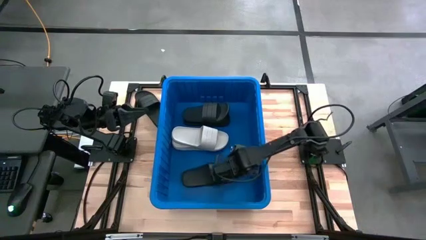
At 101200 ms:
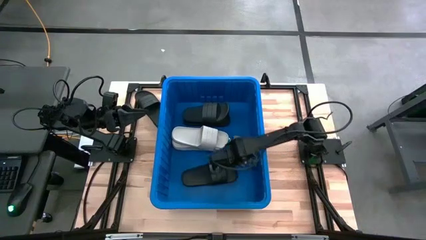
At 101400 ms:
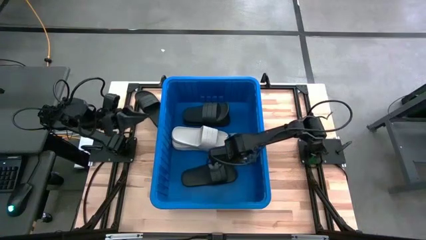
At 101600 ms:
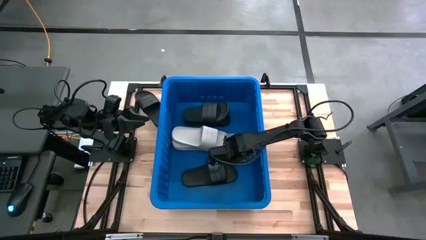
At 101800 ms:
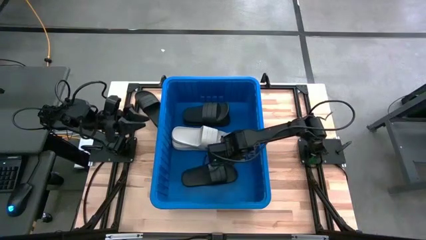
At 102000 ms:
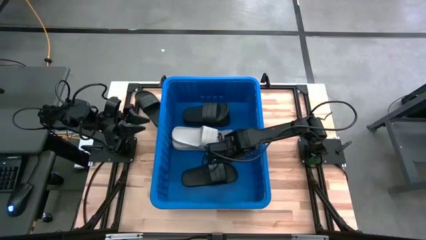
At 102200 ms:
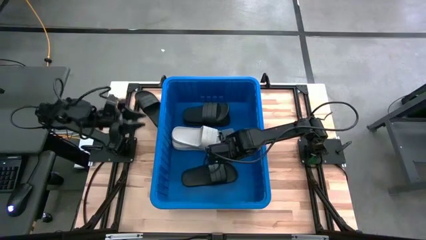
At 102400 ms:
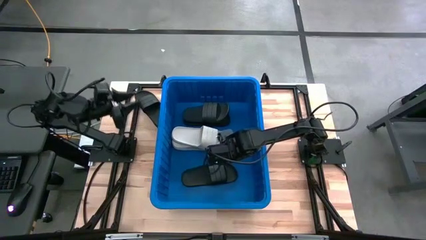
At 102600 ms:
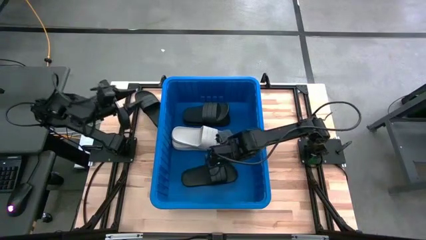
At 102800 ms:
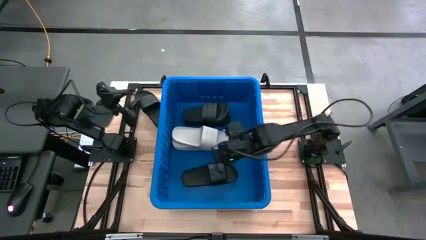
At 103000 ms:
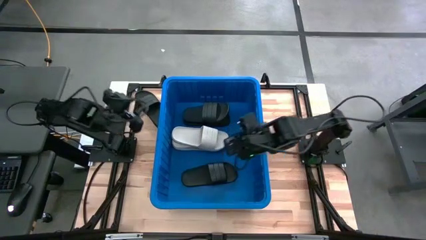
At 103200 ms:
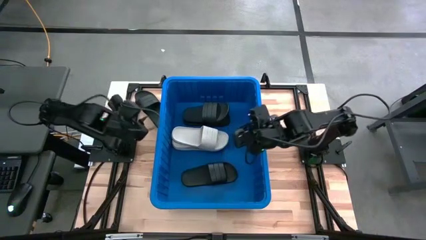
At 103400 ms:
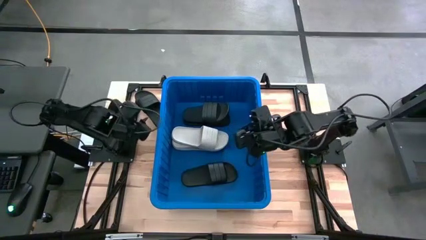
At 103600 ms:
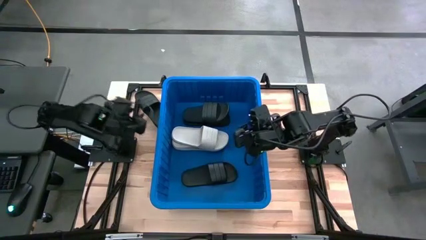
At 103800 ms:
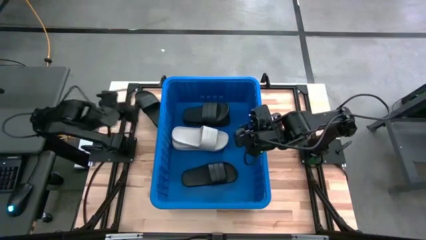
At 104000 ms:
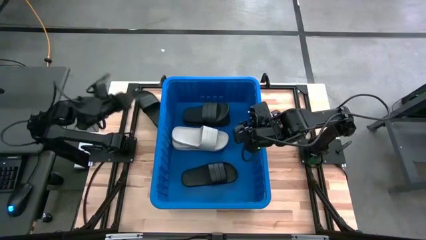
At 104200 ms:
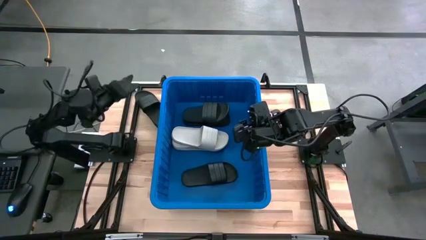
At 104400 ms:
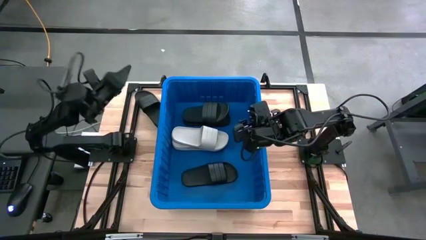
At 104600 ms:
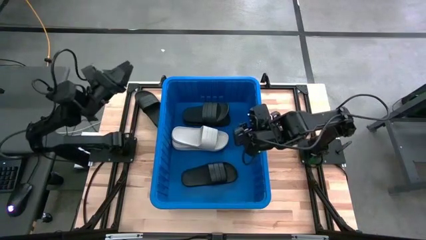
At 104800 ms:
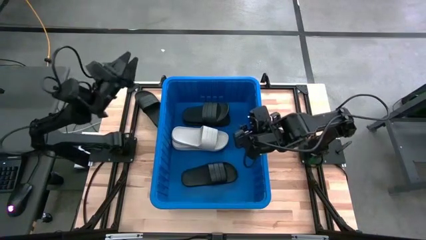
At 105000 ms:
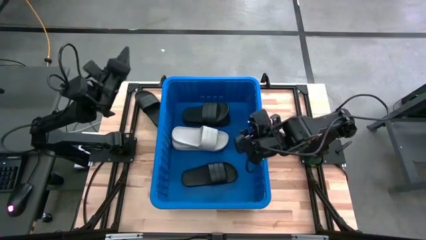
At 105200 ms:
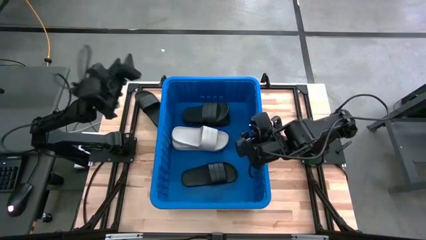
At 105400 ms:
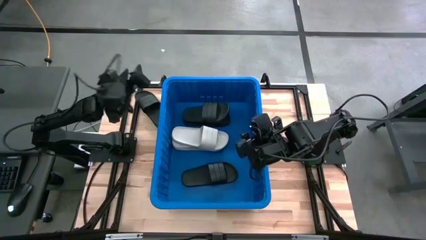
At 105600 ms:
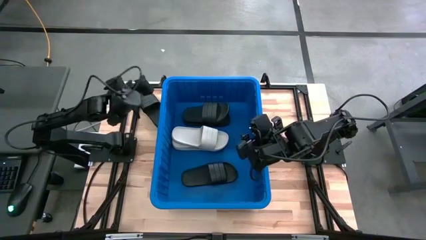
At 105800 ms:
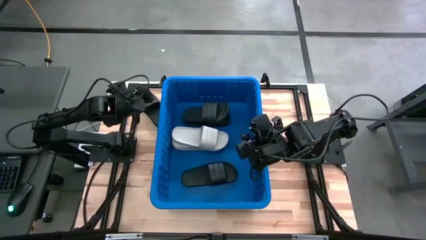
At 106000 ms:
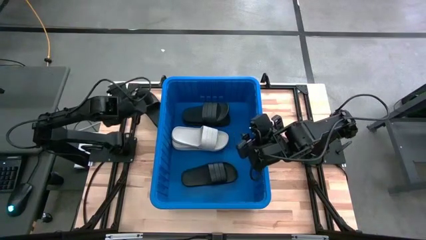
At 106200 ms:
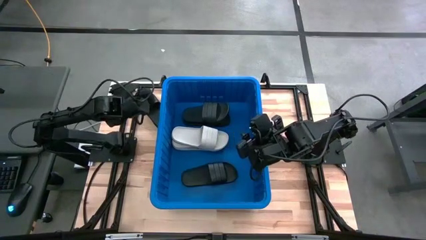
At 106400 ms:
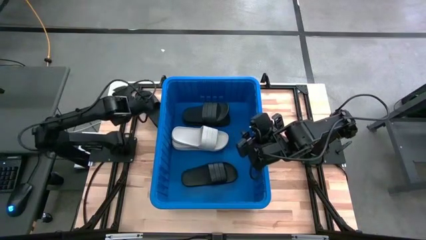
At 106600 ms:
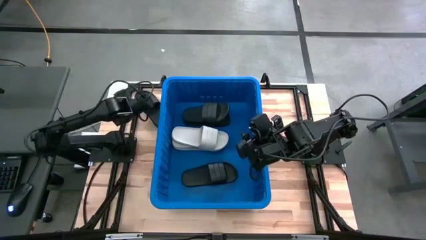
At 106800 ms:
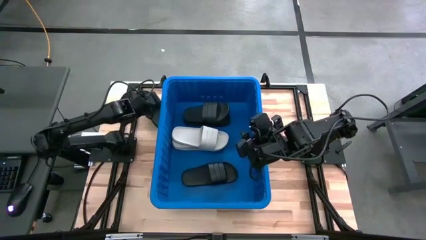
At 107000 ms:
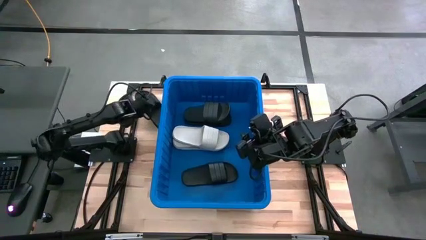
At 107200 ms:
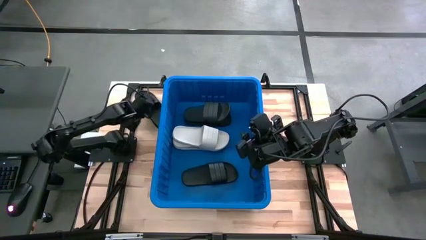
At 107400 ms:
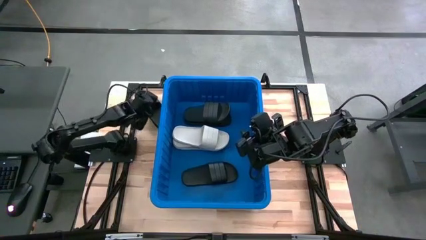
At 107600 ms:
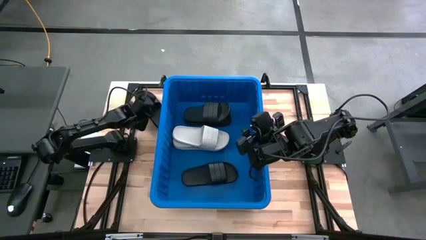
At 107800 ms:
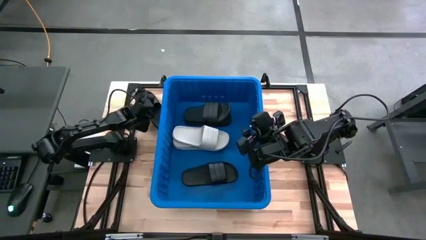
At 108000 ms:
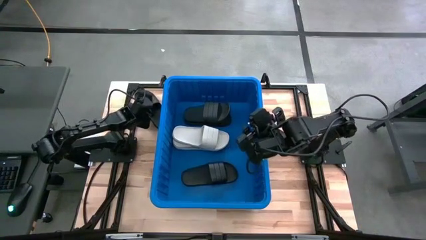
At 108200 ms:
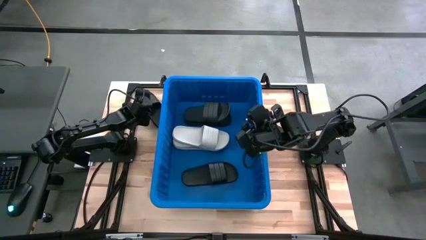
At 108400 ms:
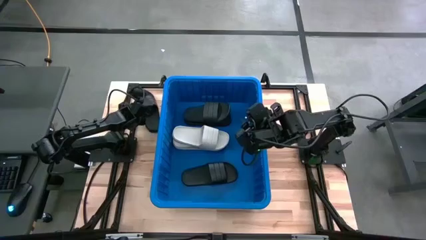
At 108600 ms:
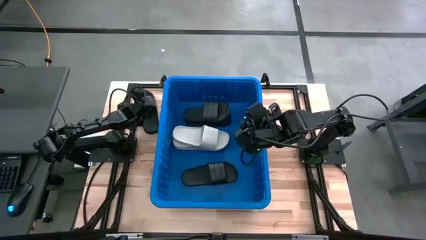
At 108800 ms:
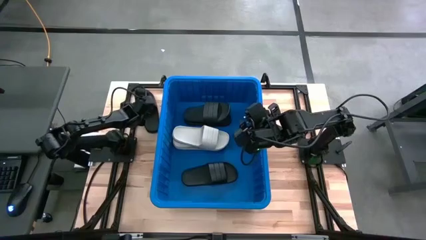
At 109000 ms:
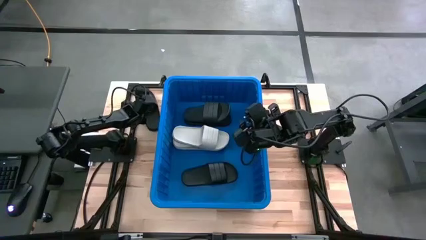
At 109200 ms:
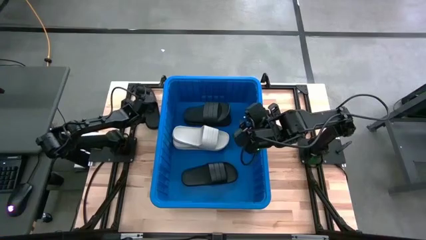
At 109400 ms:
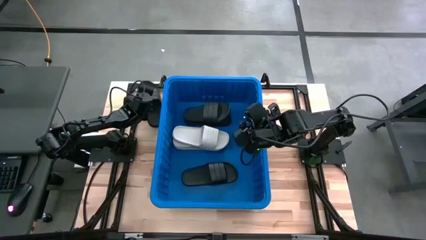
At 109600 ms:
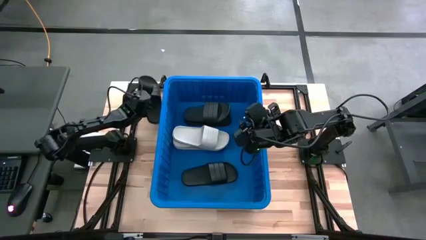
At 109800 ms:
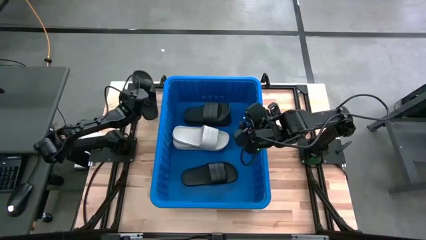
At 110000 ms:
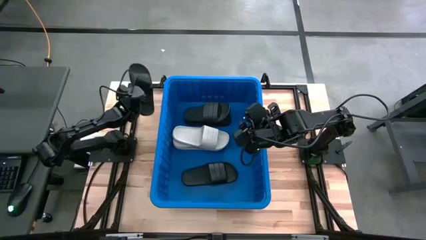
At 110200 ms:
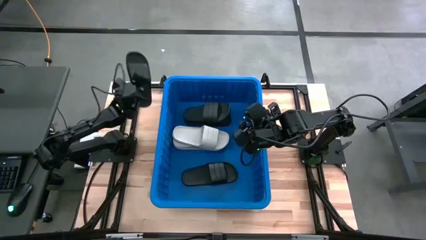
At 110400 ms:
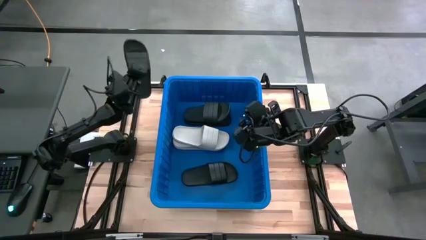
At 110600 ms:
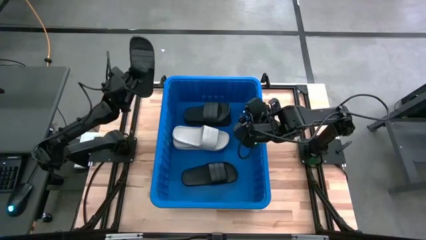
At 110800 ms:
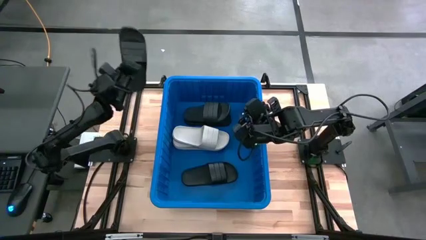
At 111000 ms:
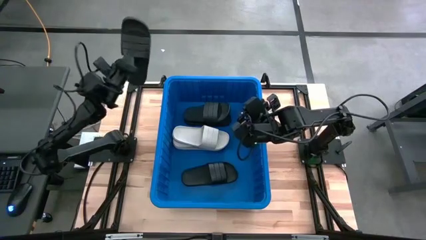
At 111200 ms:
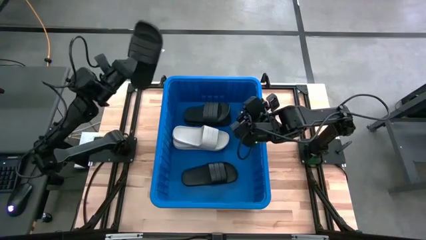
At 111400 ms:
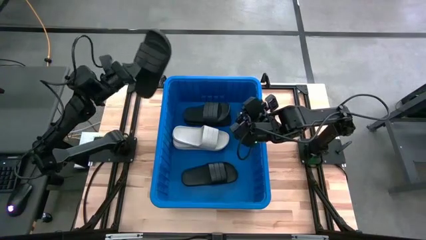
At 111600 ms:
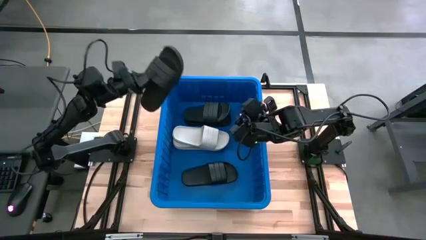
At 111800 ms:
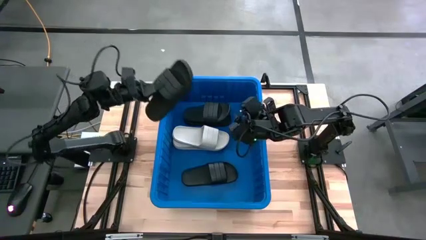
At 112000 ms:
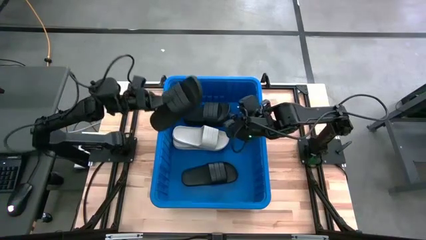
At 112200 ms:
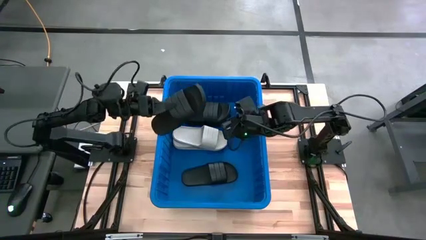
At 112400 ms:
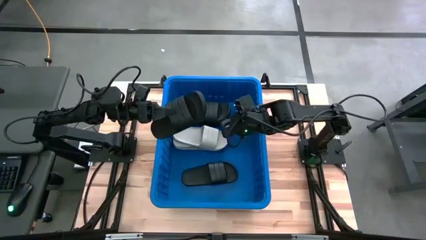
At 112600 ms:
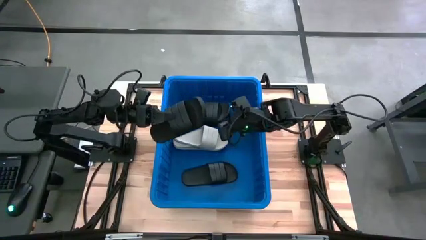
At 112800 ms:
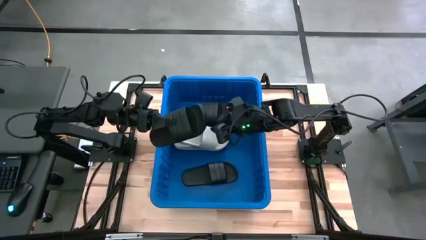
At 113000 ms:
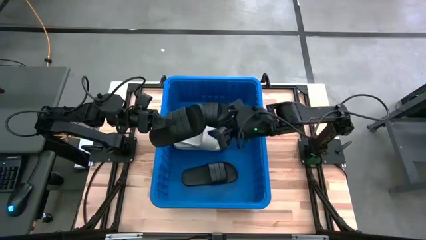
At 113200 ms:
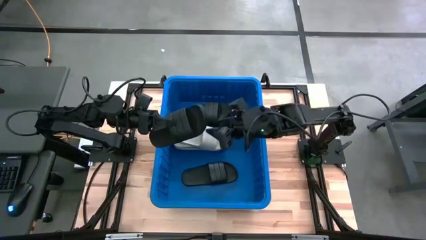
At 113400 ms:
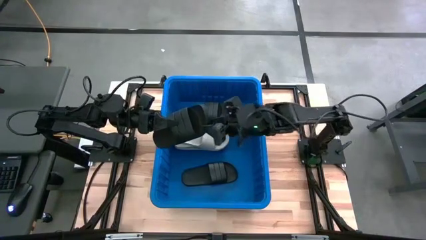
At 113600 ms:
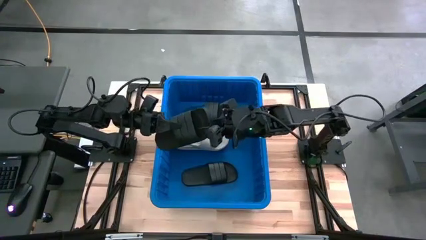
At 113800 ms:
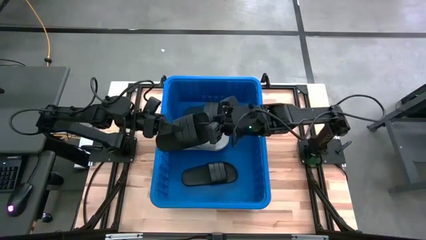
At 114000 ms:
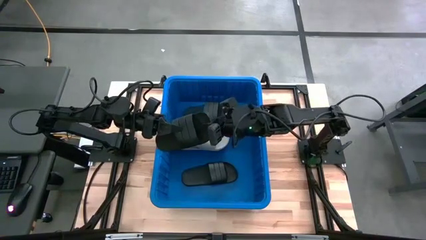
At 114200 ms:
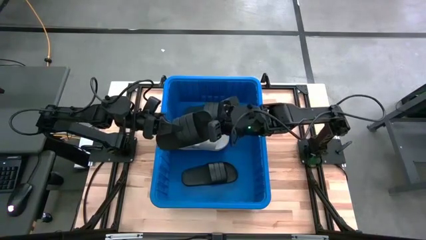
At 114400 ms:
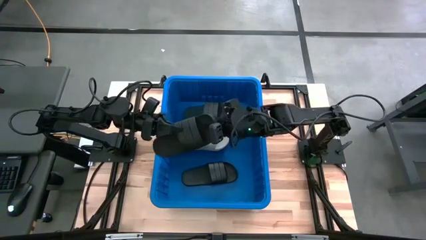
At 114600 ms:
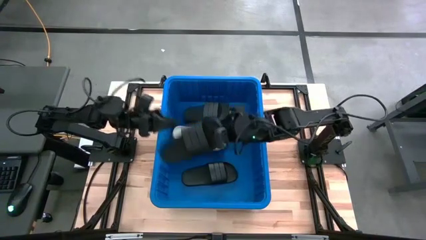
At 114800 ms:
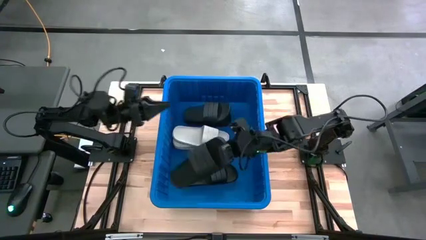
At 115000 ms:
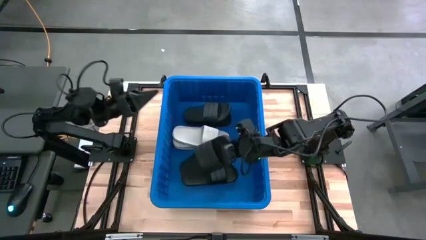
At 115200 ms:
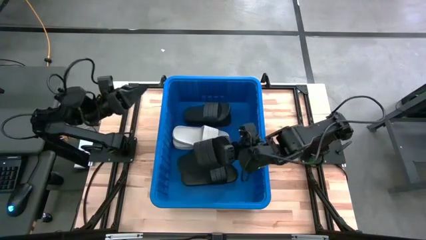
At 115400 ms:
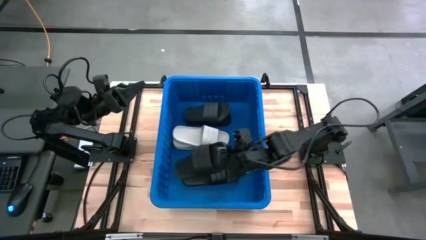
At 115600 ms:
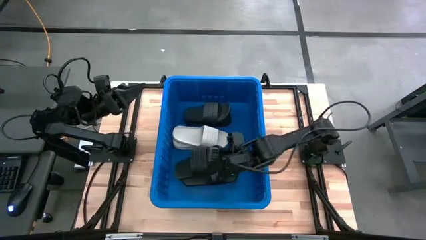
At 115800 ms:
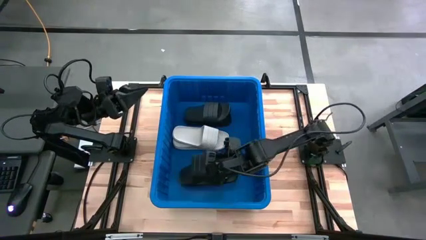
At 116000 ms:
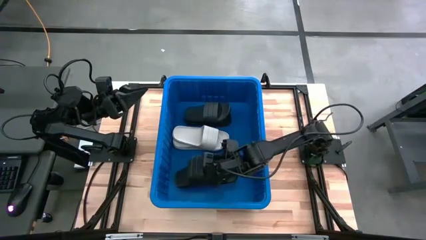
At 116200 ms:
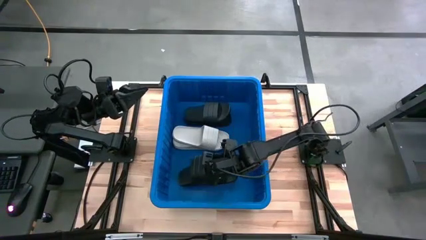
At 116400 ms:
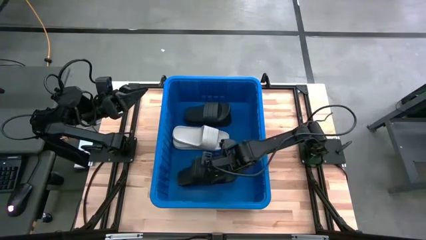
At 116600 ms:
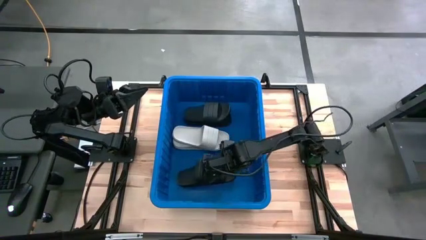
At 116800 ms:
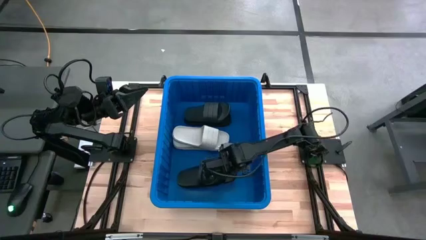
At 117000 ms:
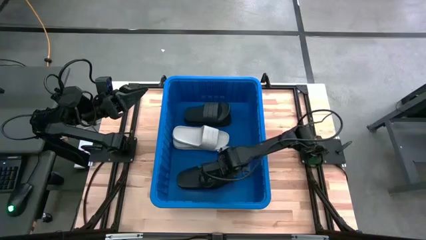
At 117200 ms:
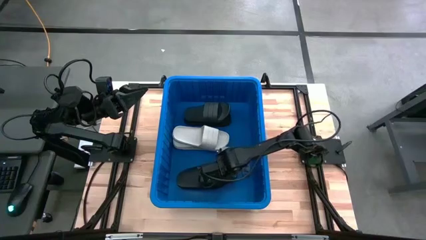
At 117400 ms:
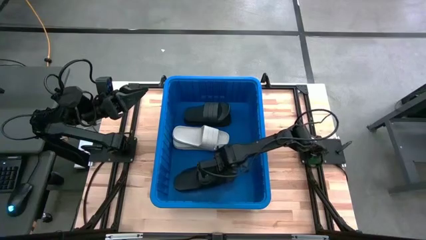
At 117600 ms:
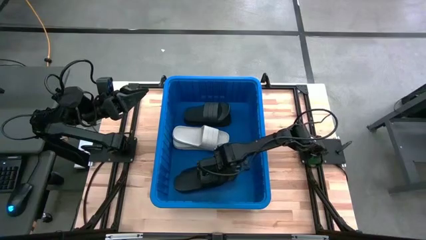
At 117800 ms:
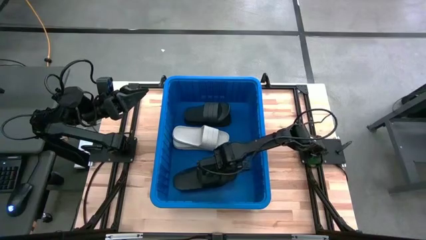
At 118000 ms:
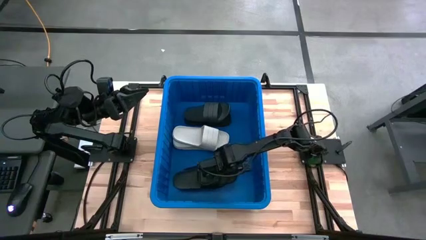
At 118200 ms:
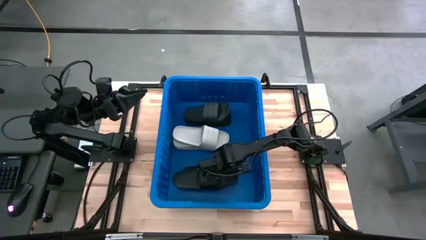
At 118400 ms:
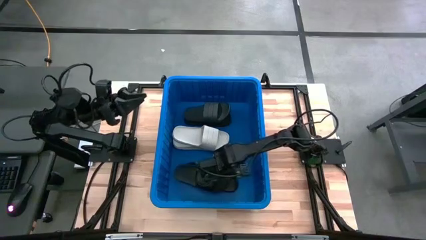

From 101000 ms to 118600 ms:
Task: Pick and place slides into bin
Put the black slide into the blue bin
